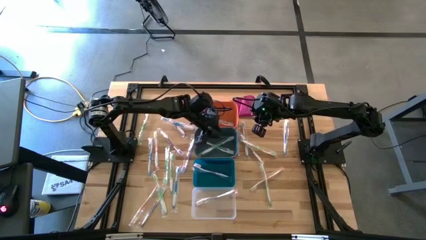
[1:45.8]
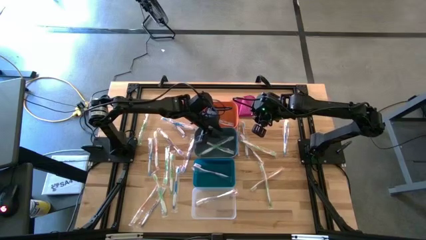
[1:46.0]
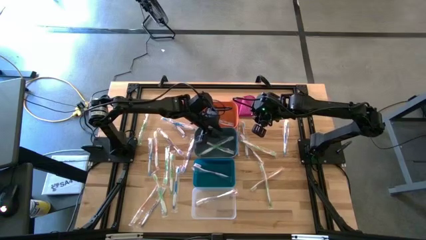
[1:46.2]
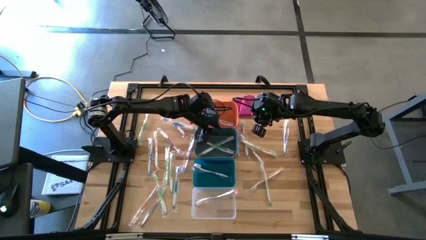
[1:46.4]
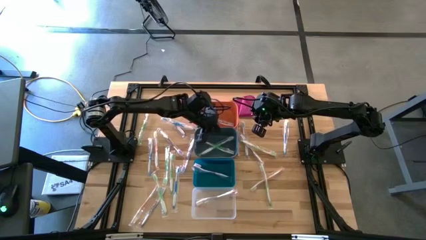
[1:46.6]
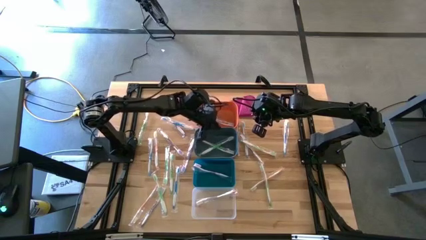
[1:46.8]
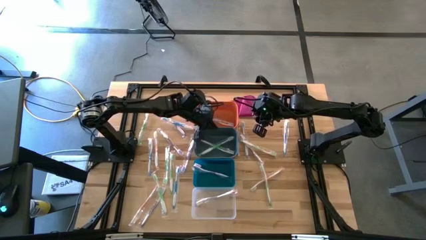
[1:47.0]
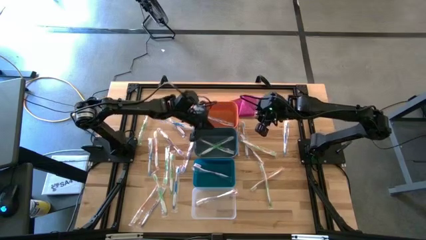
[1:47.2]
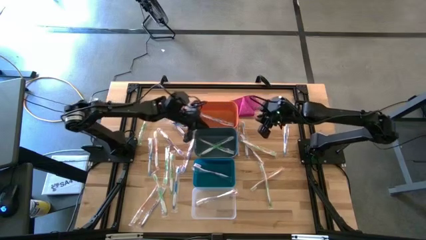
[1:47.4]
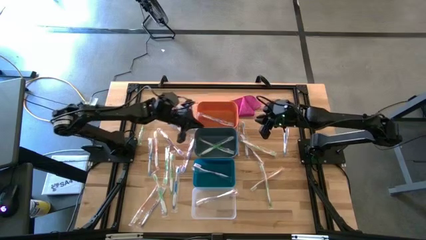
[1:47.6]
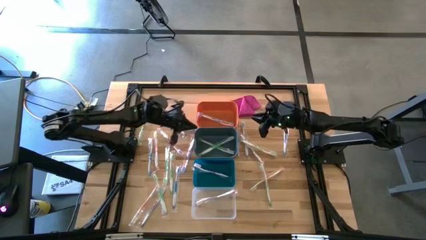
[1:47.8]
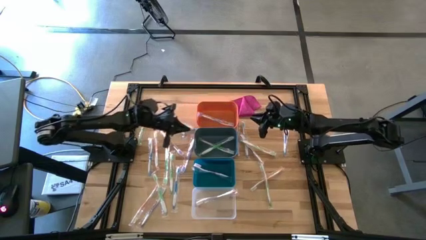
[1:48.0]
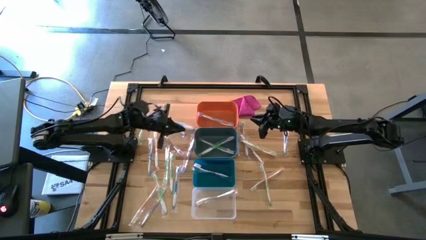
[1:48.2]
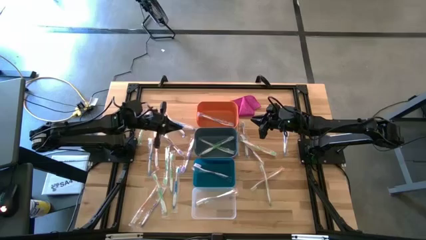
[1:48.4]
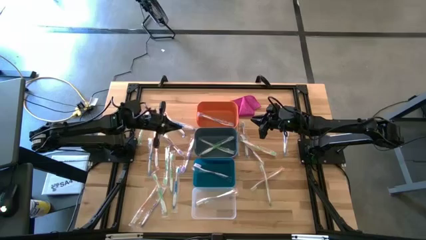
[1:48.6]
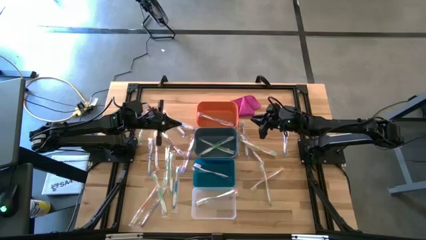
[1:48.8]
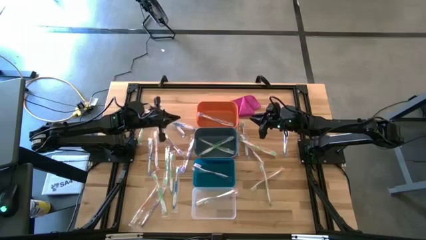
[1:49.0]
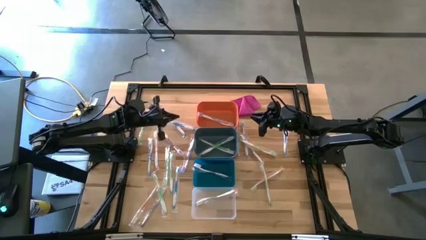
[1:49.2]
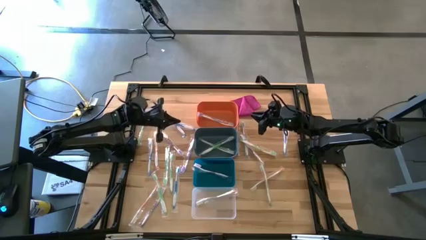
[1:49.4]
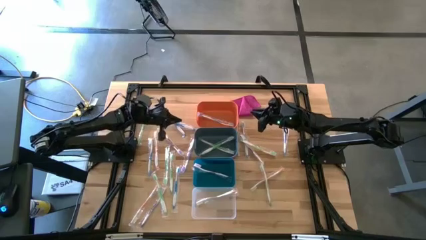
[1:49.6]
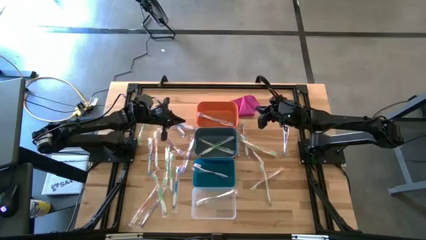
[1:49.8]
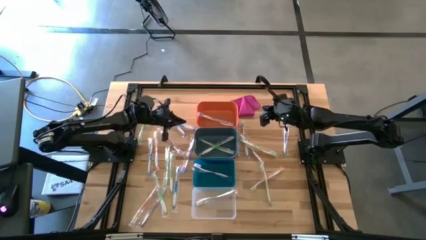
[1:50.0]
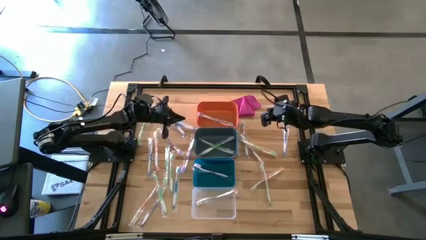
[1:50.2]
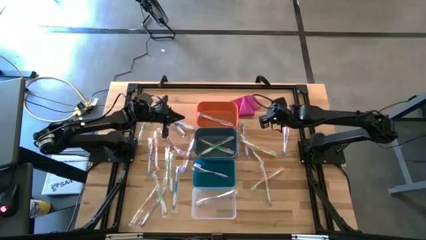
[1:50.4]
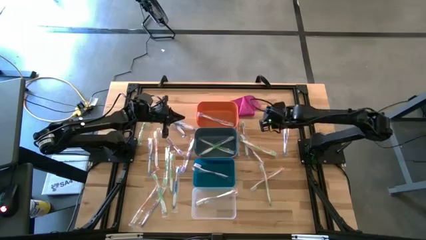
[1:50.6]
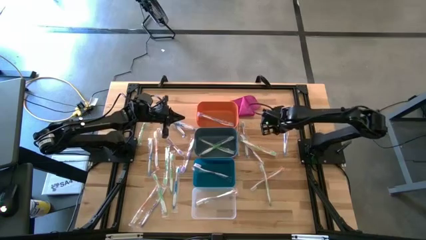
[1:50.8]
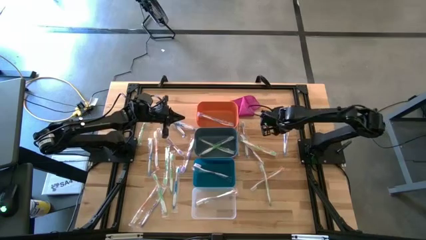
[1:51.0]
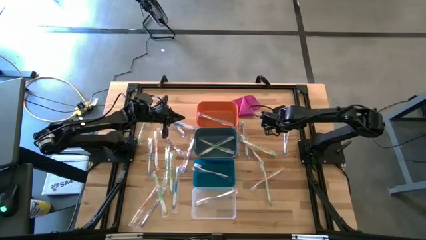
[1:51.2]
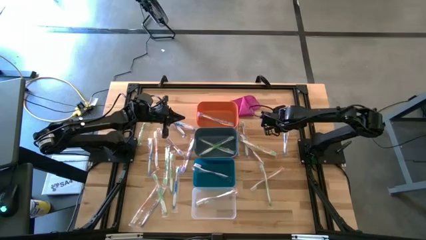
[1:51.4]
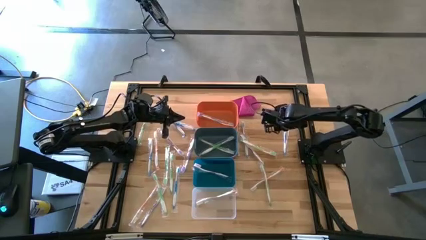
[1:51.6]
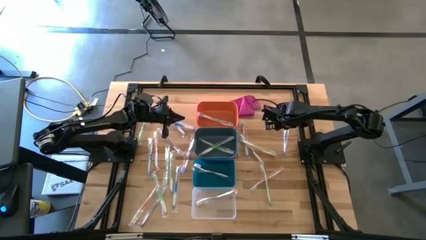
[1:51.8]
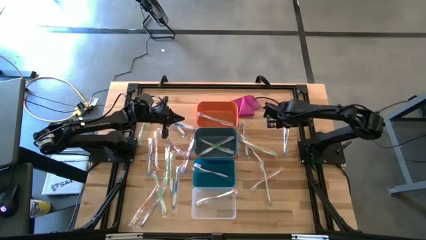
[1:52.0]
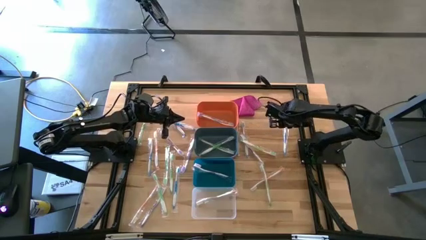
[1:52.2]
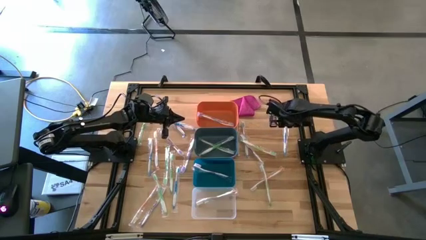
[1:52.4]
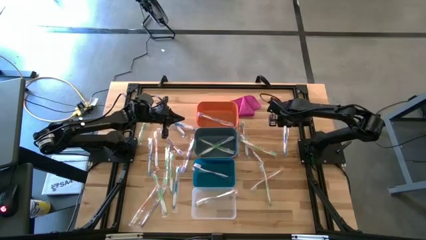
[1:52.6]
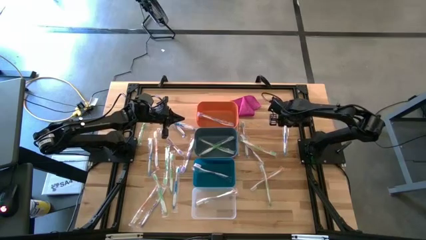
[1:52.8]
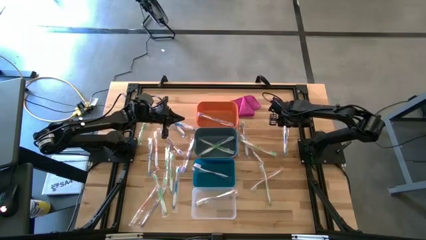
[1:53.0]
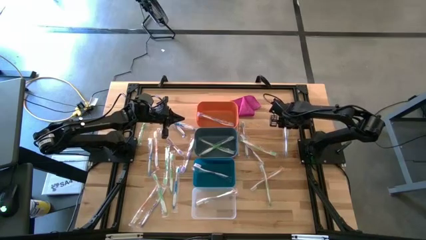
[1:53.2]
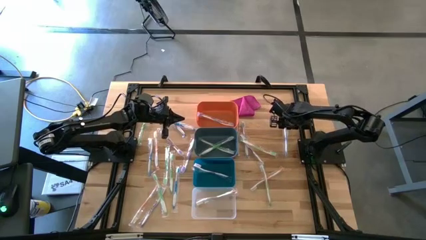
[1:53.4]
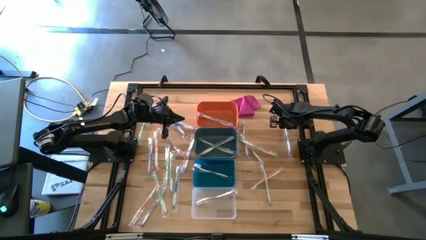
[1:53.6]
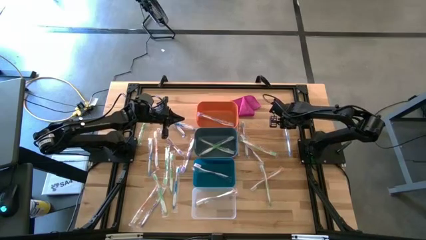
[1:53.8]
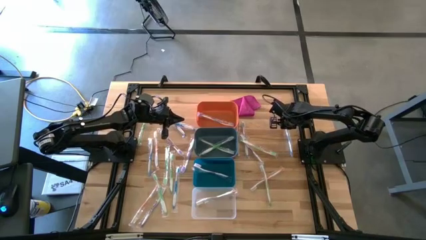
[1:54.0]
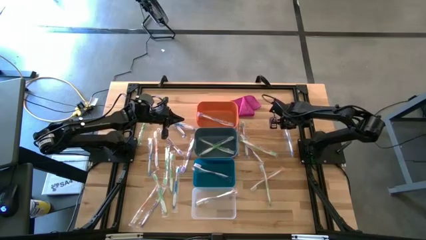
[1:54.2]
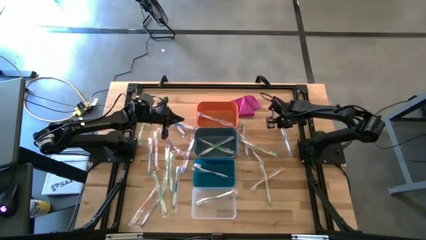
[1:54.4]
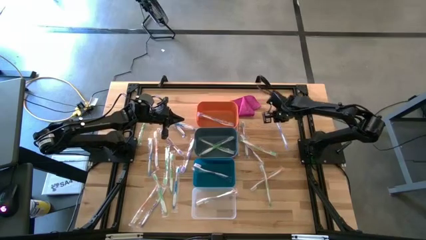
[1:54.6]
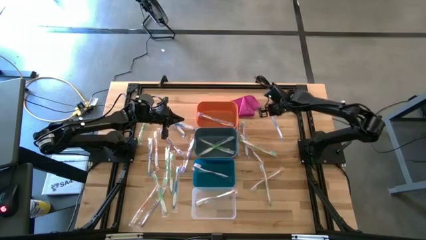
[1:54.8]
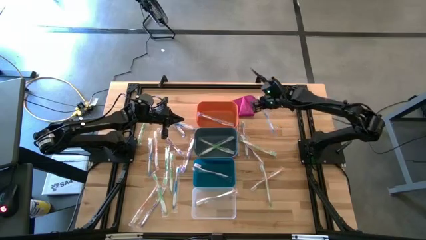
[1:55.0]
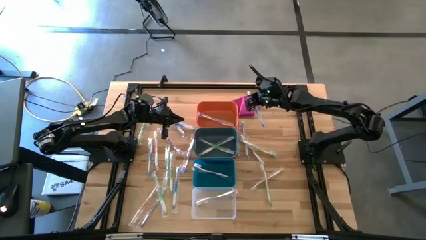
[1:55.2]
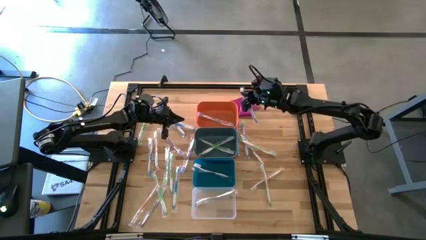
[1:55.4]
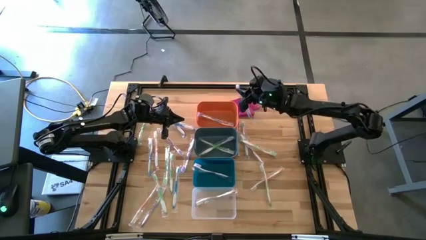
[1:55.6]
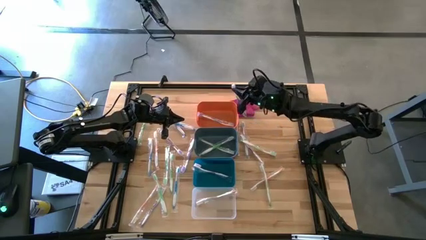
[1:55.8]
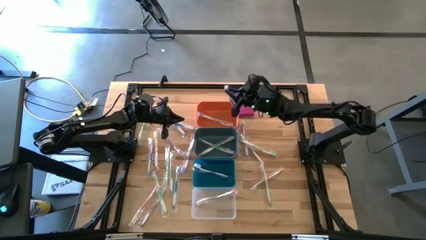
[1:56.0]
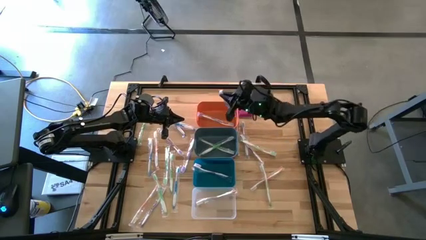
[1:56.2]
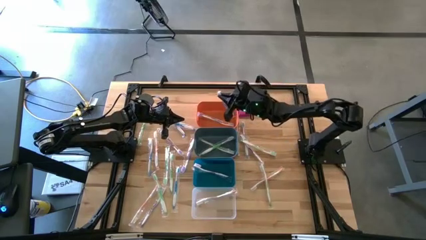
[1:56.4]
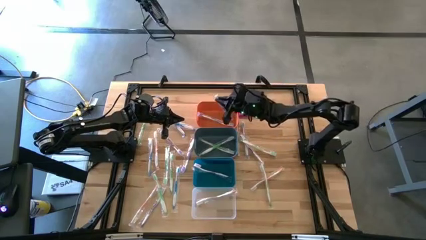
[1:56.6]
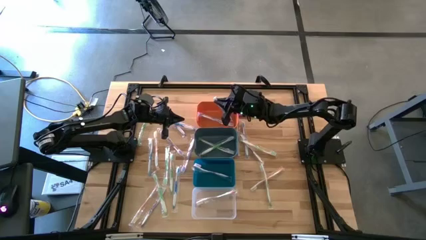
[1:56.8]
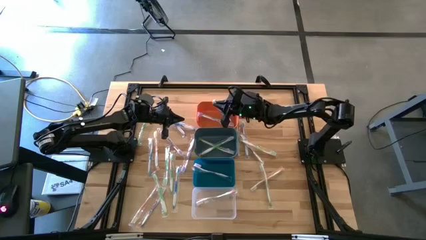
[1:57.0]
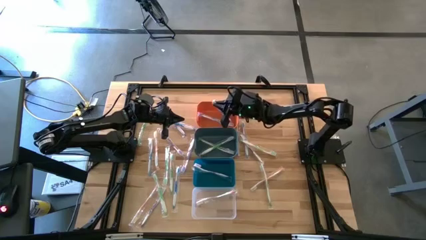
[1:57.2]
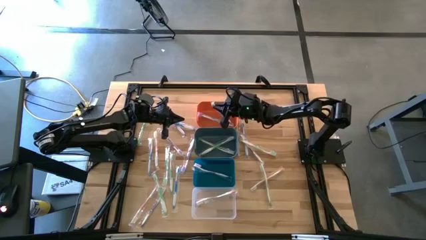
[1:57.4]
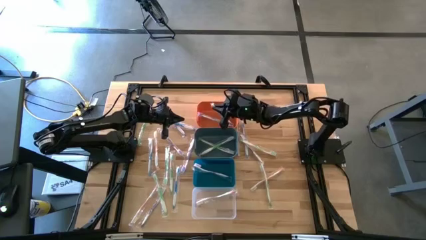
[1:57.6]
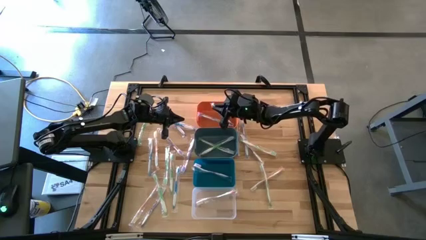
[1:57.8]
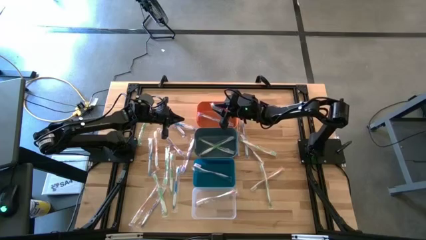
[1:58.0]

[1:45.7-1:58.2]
Task: Pick & Place Toothbrushes
Put the blue toothbrush into the orange bin

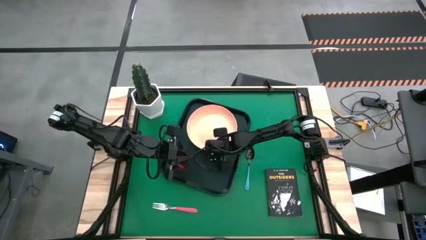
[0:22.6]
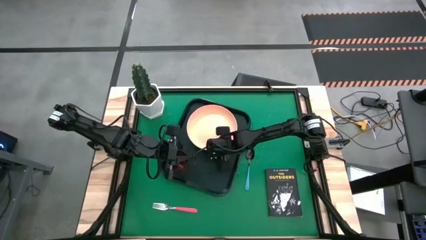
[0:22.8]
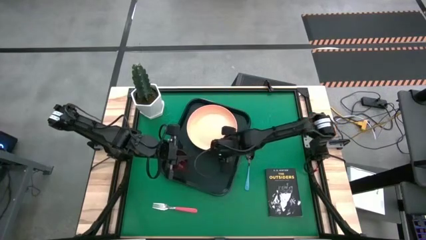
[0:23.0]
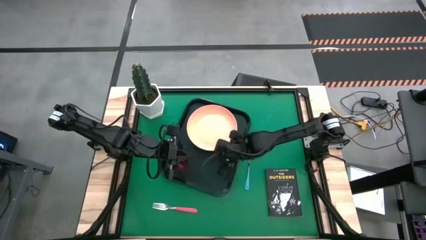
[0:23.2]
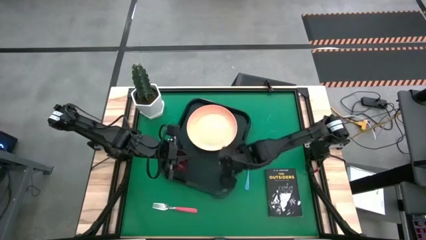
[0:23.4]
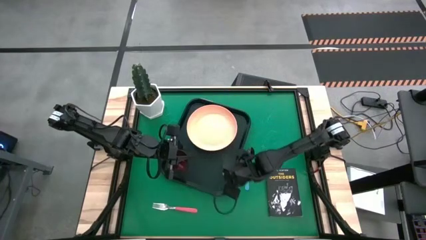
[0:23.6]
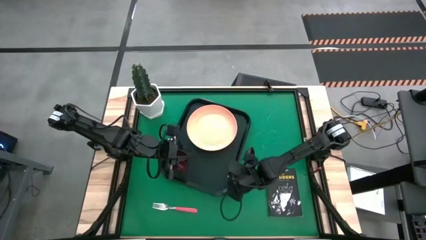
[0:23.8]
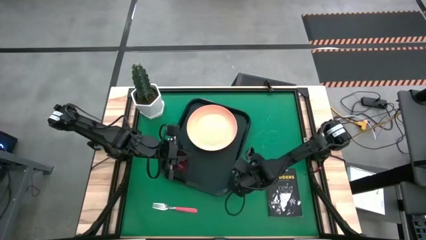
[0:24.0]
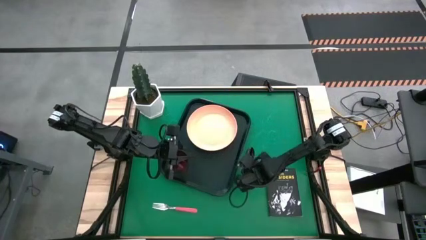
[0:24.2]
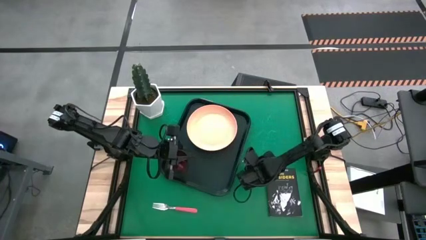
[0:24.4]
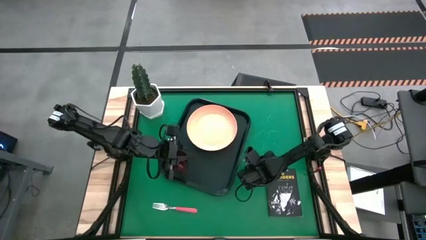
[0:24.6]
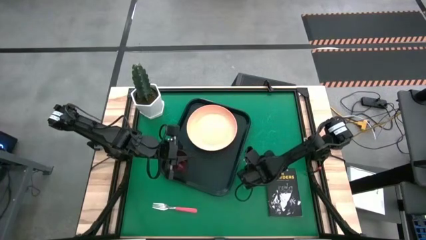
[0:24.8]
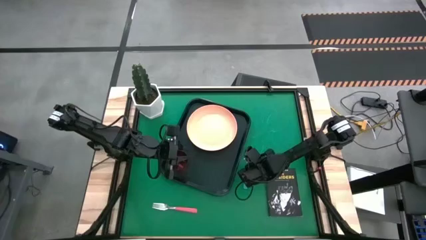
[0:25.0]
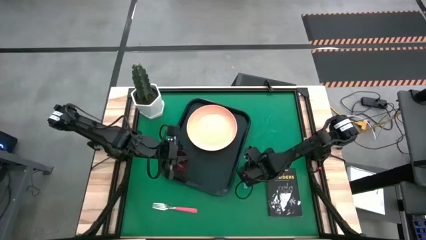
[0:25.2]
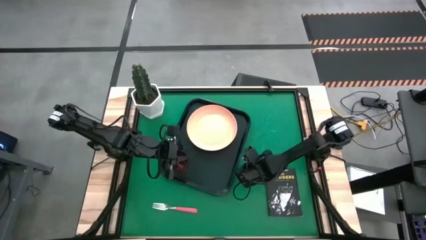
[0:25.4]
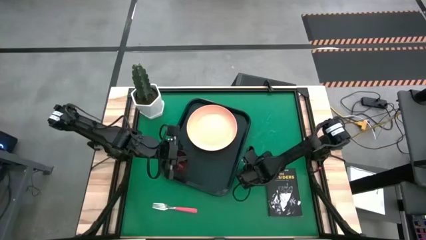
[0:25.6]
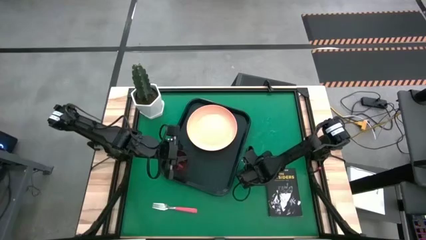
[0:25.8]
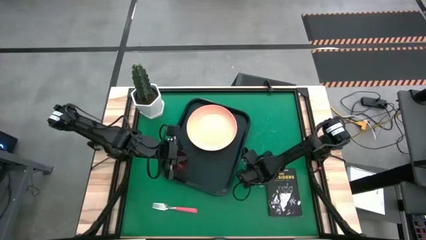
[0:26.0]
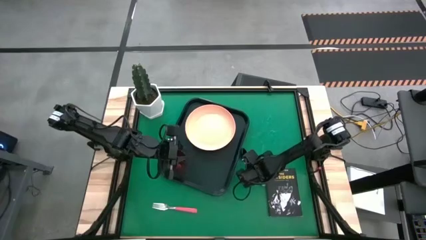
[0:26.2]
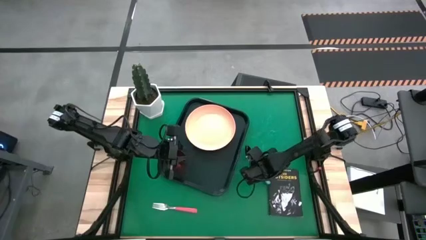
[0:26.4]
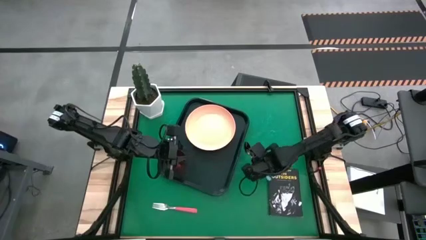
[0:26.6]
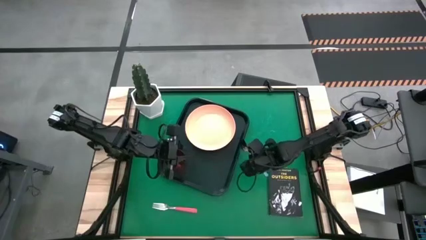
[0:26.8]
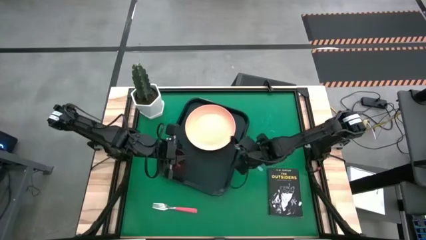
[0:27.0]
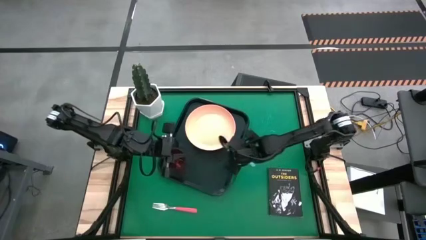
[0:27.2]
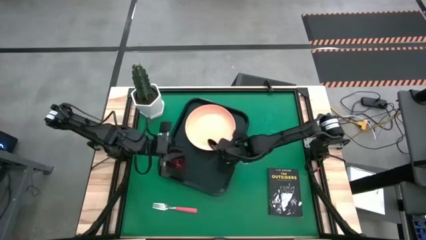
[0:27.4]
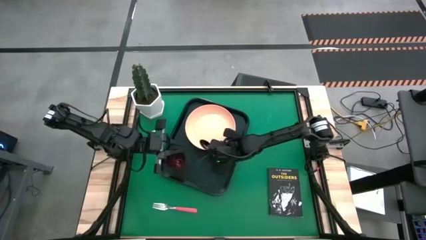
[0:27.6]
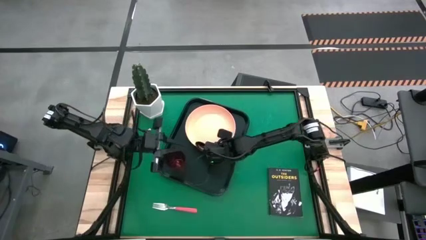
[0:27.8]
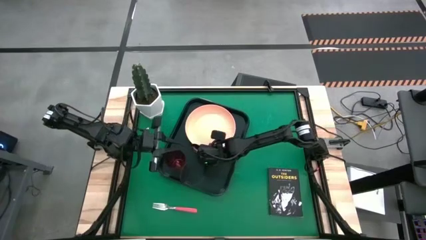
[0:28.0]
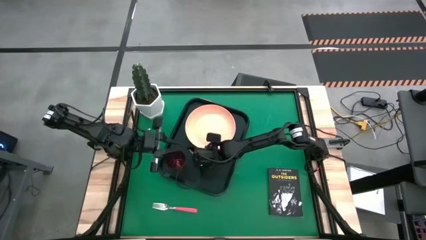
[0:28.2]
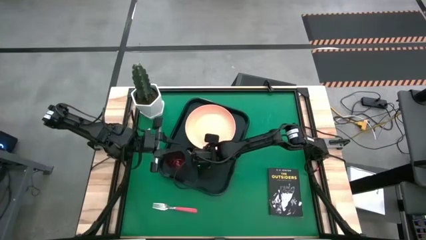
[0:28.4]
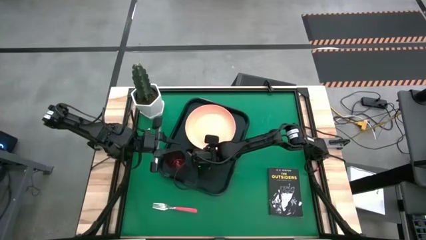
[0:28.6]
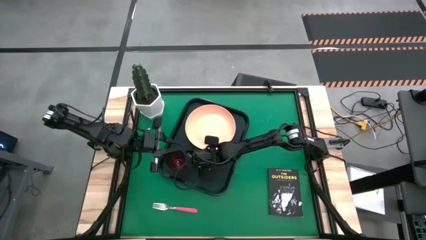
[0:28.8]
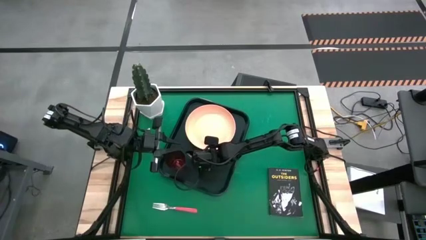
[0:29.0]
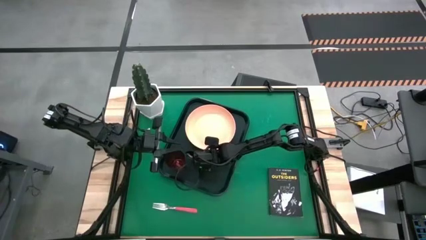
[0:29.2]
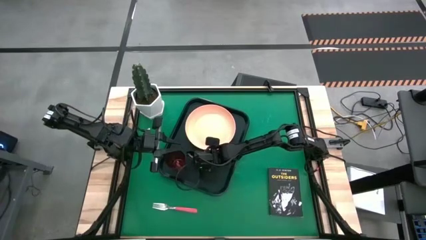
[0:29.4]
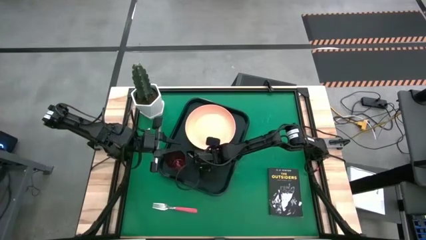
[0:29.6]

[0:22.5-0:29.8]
Task: Pick and place plate/cup/fork/spoon on tray
Put the blue spoon on the serving tray to the left of the orange plate
